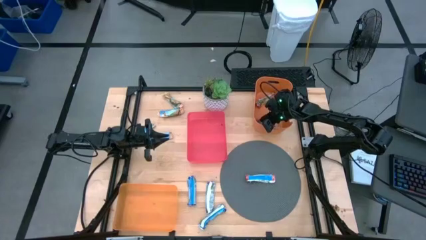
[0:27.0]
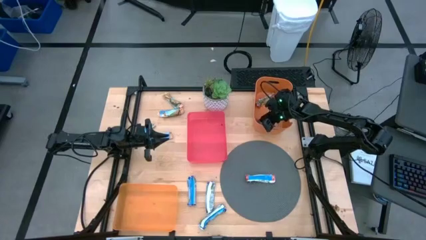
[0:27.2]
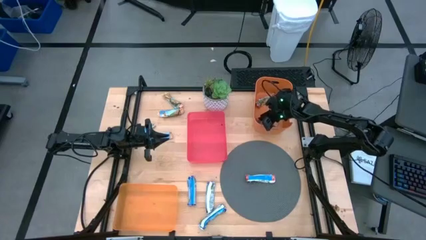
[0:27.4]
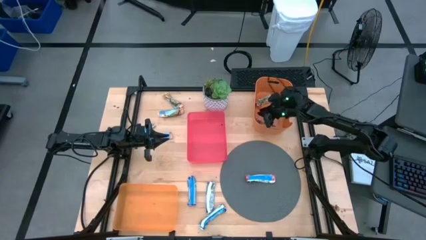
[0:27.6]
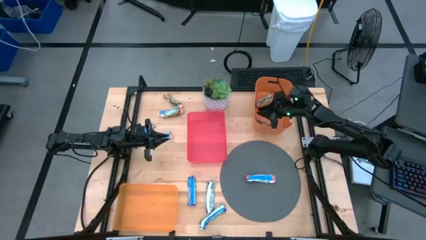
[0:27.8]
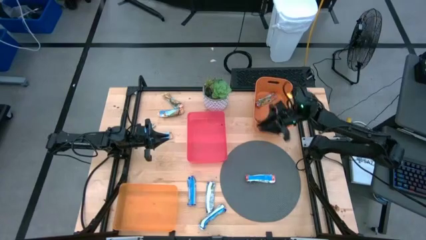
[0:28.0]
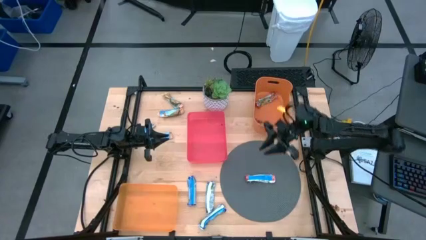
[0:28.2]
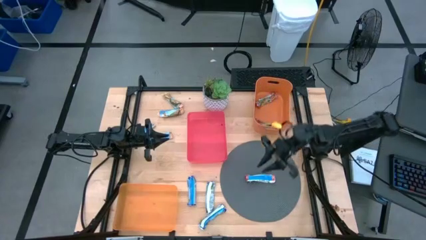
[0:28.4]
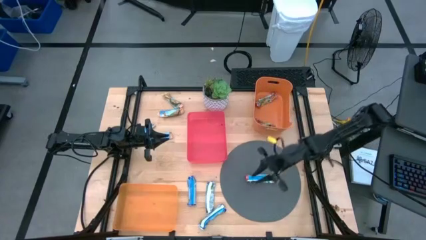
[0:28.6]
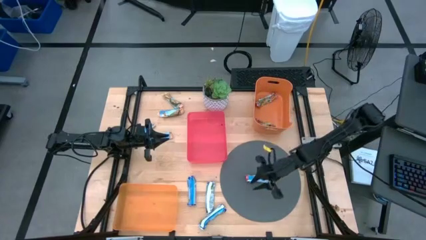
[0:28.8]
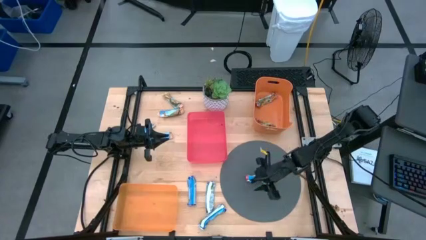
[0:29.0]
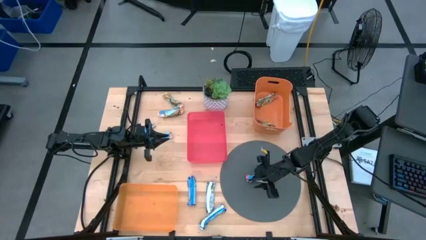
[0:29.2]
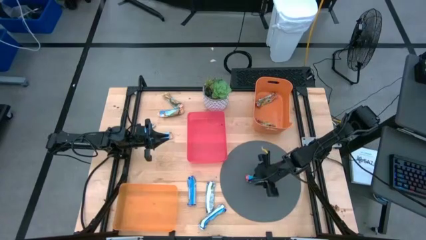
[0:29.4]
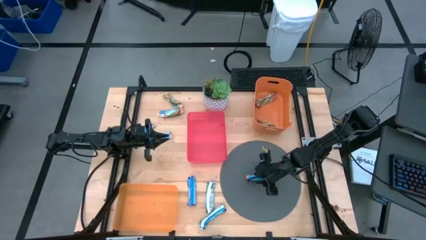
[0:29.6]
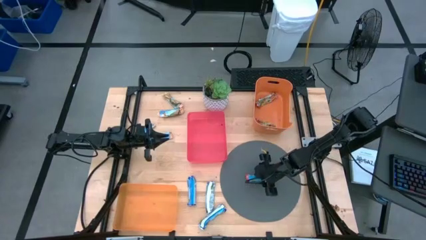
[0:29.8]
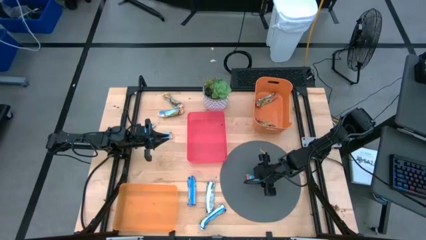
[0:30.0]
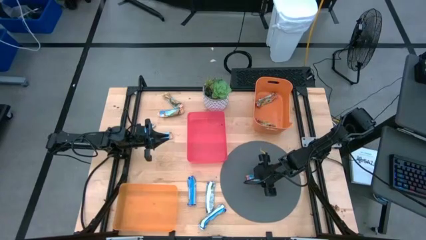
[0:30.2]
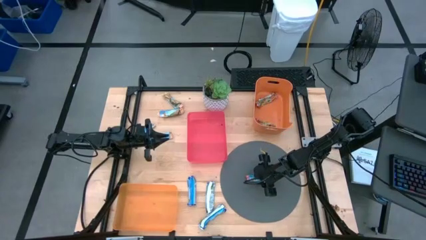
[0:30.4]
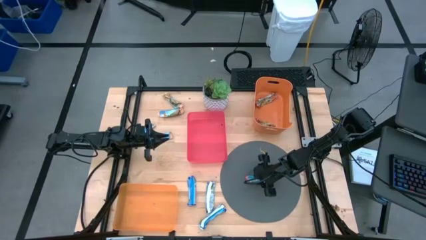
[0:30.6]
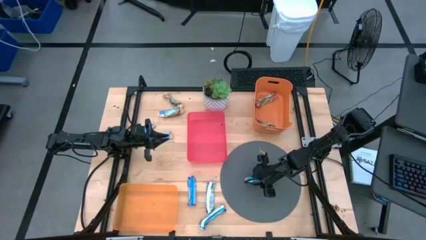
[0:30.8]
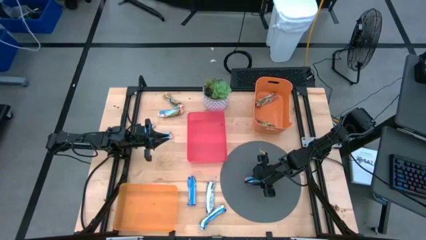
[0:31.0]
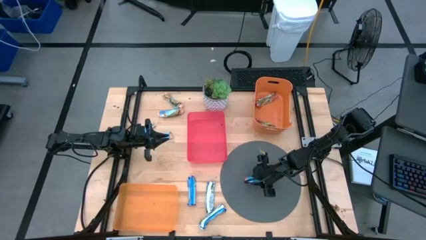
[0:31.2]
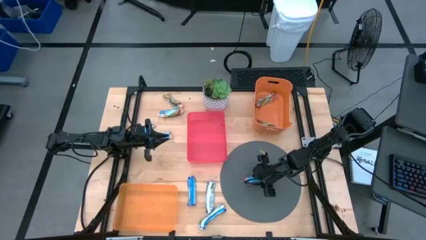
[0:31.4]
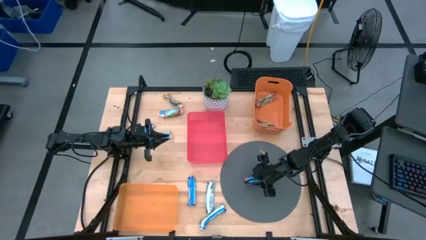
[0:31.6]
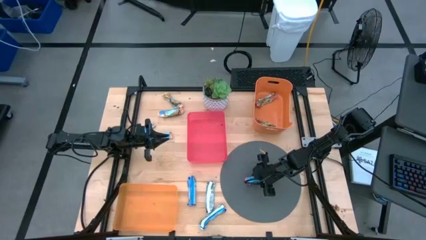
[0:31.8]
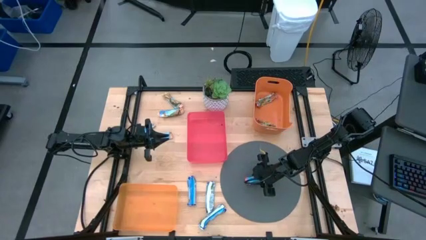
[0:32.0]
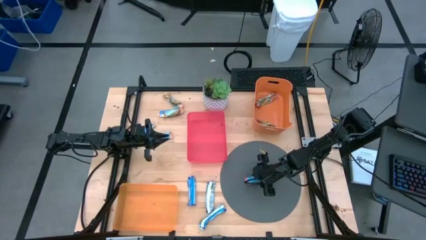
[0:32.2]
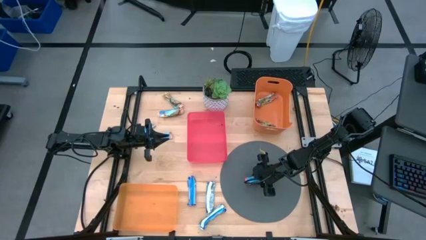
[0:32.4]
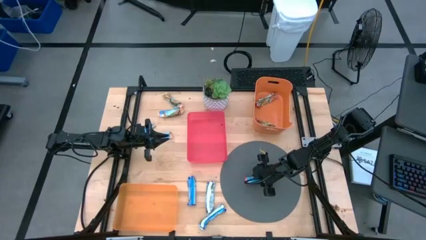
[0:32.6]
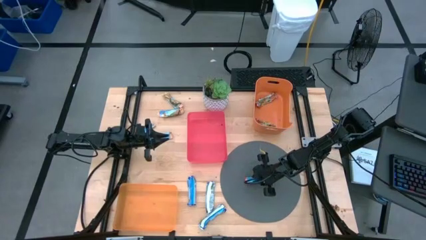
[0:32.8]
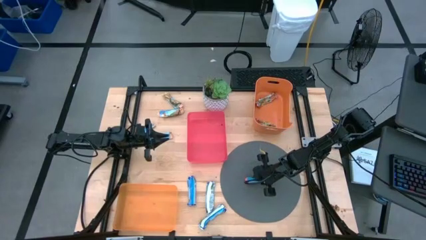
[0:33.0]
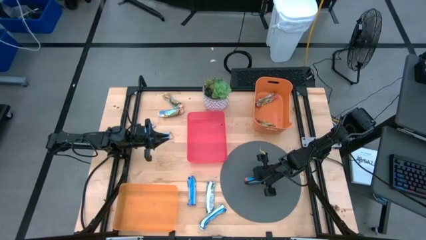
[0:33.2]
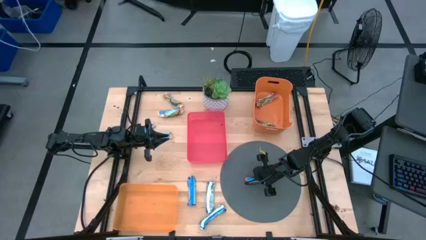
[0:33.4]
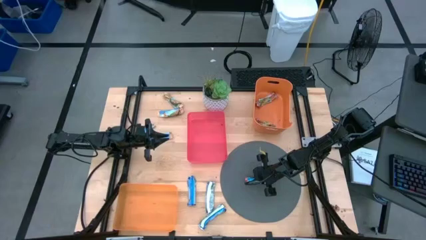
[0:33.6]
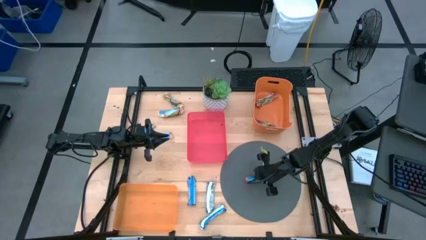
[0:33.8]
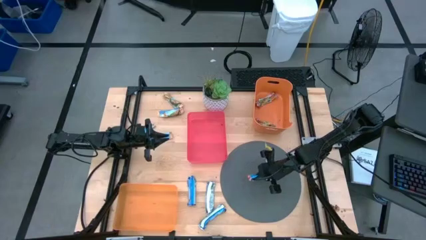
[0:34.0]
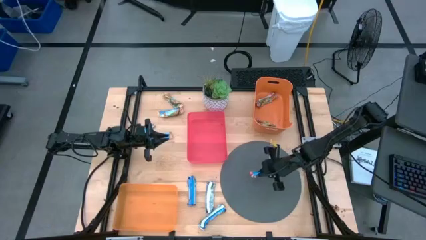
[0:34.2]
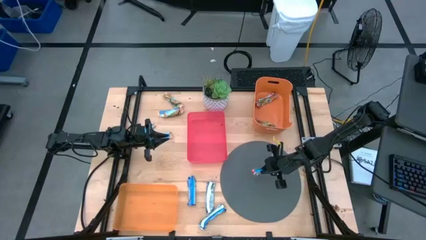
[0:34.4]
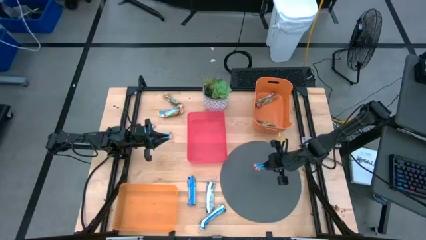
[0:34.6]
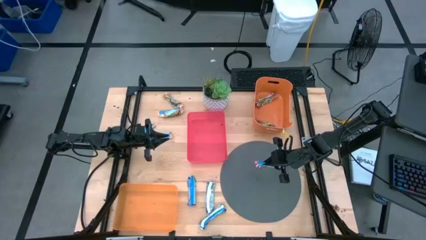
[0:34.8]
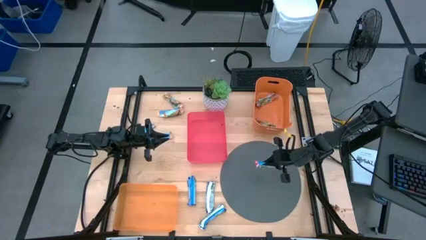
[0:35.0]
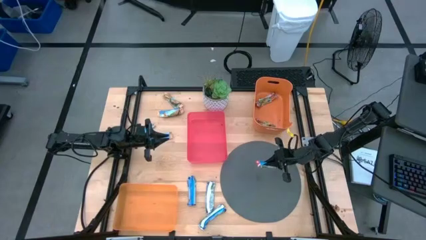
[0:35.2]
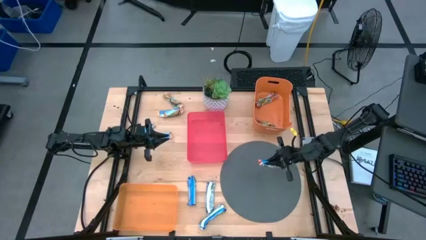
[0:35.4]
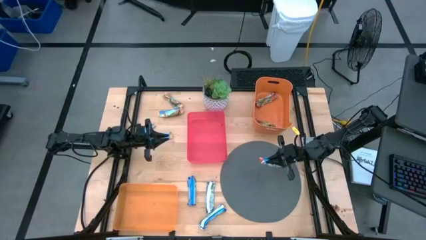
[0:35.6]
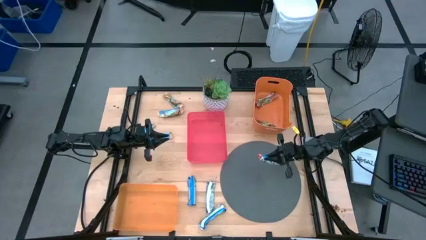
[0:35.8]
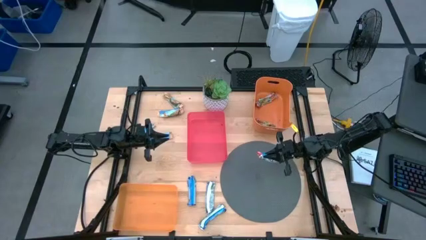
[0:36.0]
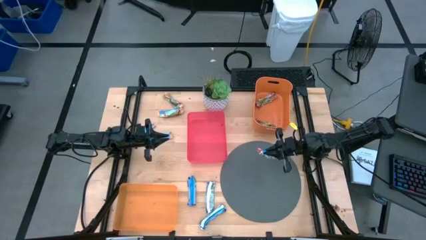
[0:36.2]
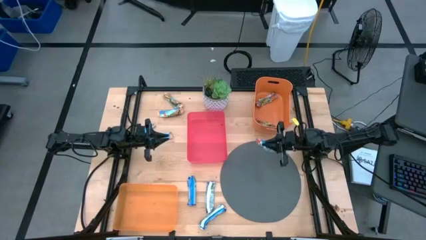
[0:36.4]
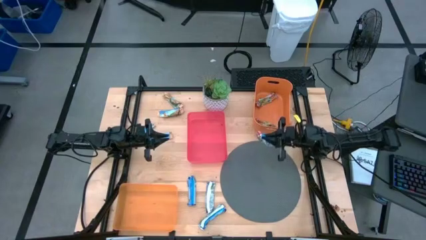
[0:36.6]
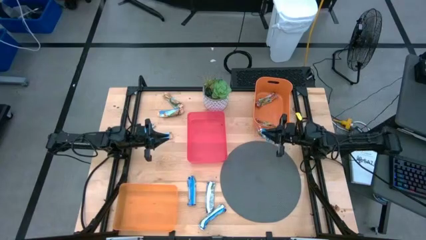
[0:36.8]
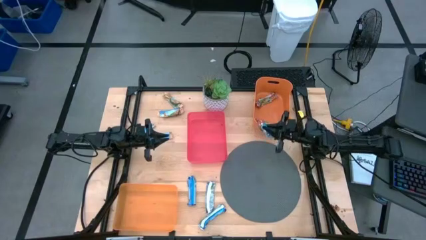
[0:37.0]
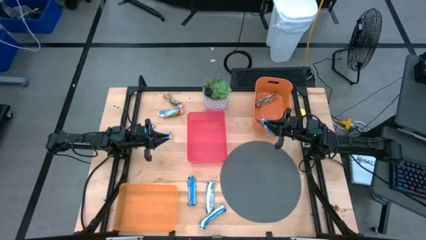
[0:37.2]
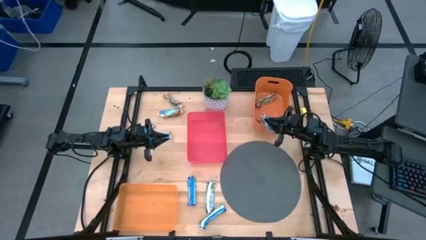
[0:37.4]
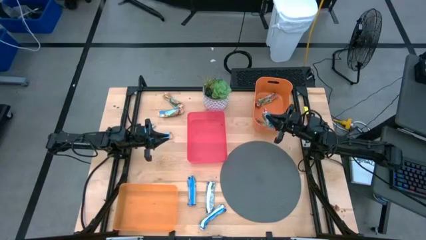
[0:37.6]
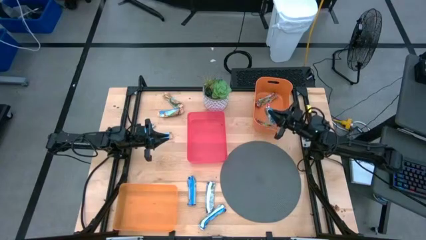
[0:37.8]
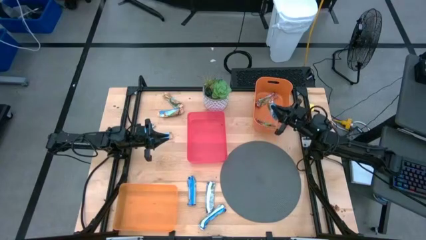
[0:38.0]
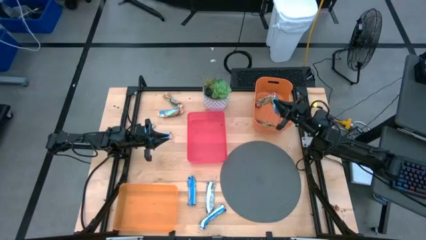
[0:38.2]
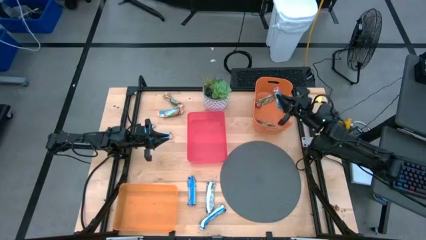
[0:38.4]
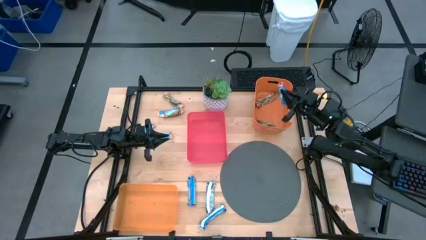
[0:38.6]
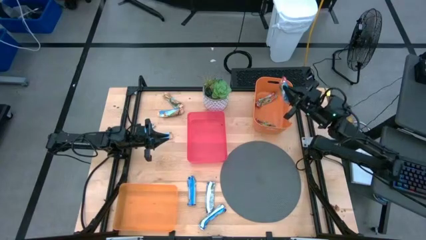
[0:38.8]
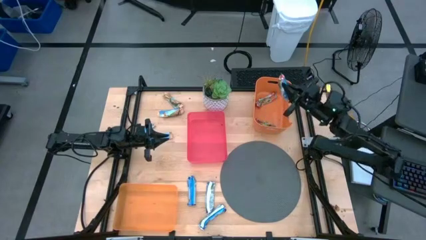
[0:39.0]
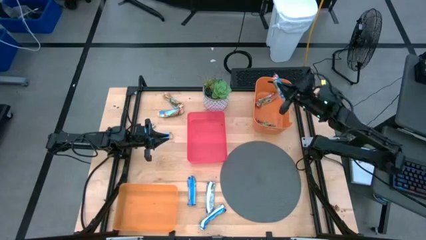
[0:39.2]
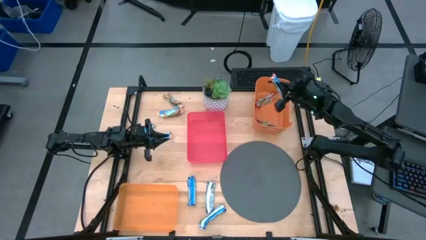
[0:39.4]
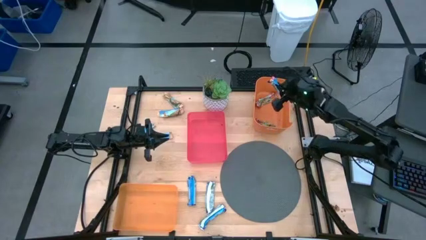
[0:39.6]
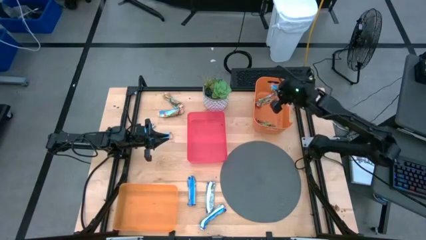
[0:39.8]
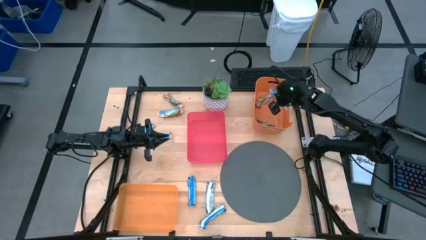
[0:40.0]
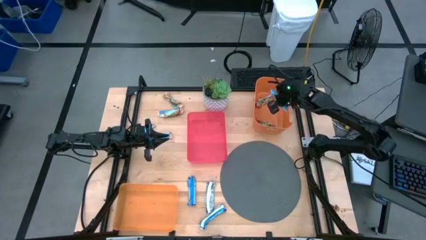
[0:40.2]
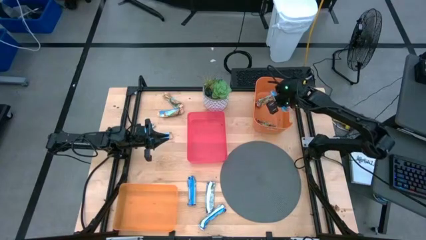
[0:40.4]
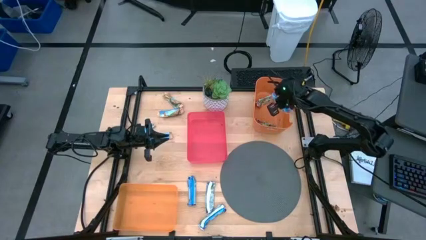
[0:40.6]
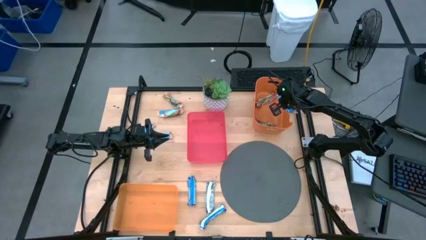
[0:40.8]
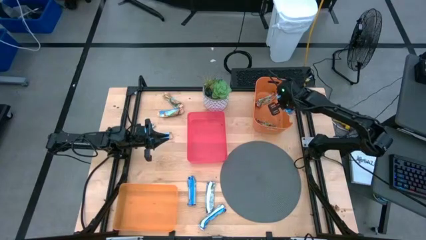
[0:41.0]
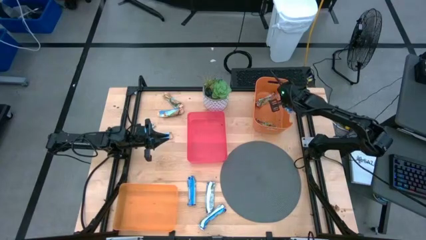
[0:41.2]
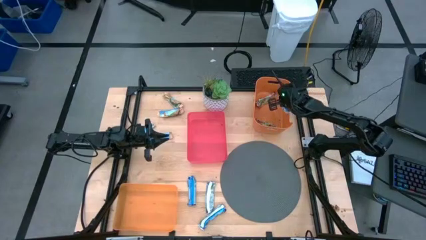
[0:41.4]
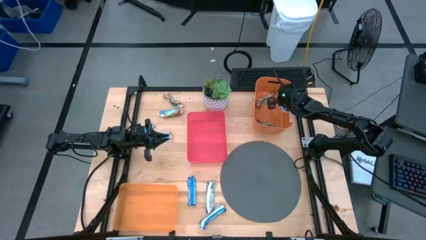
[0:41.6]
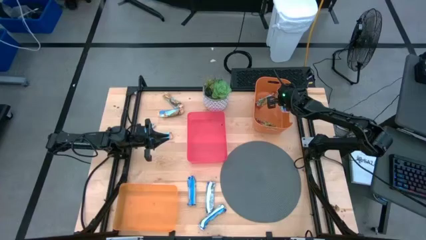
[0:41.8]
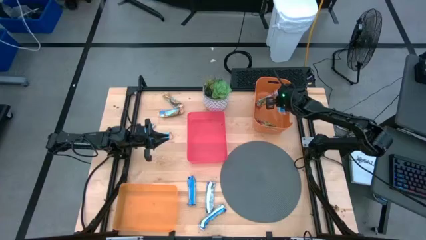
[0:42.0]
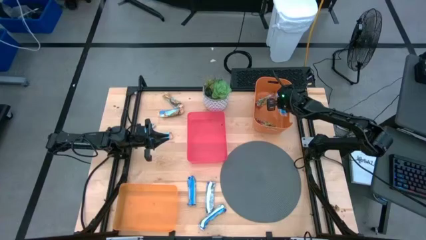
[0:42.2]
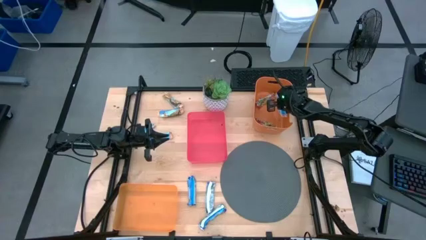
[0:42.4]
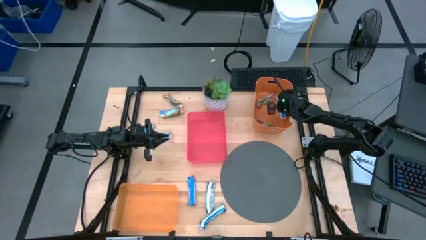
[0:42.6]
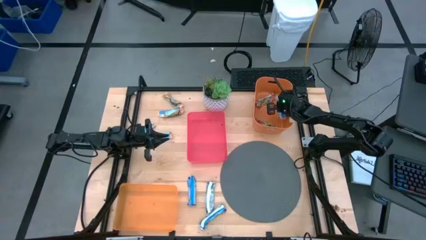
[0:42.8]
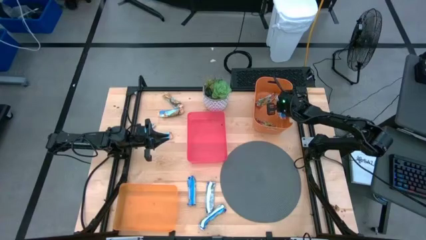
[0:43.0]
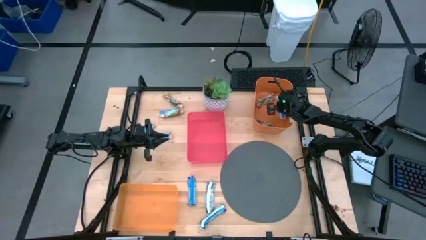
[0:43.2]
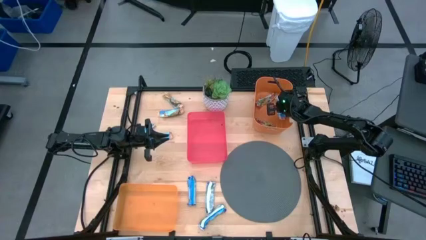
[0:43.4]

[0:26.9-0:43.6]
Task: Pick and place Granola Bars by type
Put the green/red granola bar into the top right orange bin
